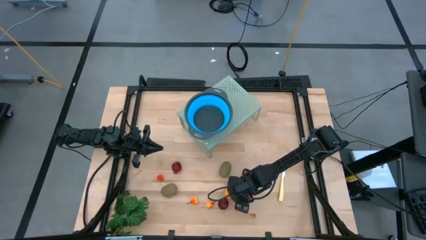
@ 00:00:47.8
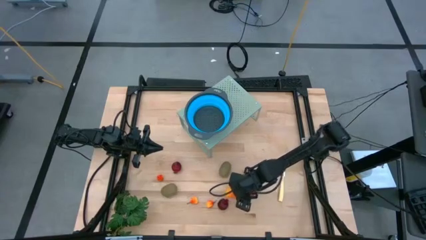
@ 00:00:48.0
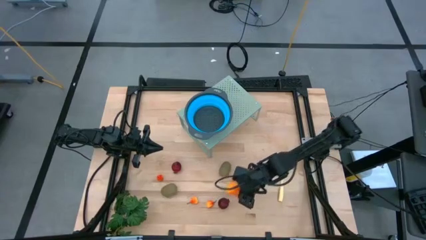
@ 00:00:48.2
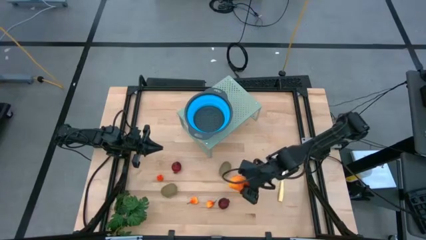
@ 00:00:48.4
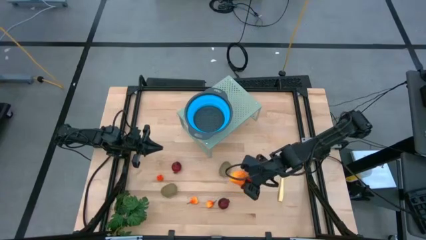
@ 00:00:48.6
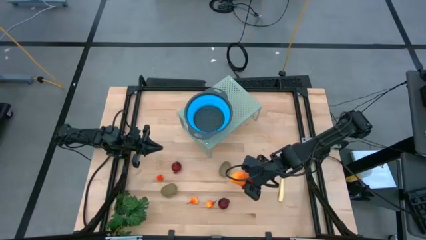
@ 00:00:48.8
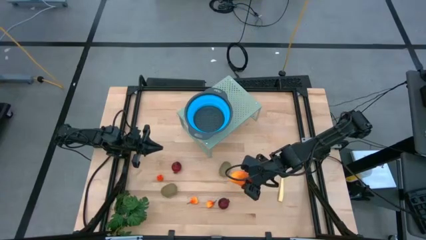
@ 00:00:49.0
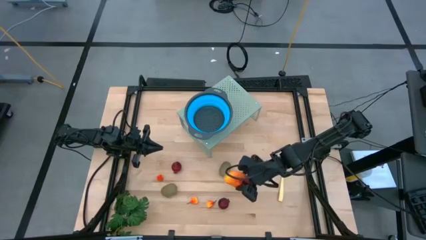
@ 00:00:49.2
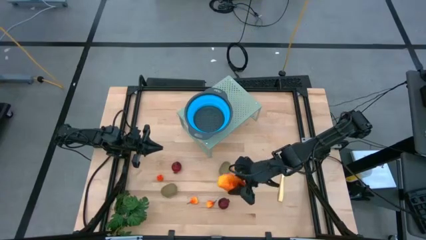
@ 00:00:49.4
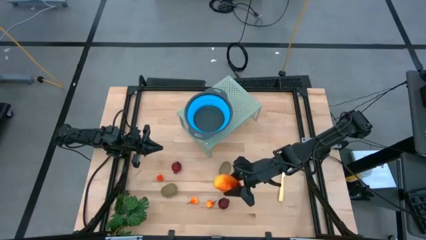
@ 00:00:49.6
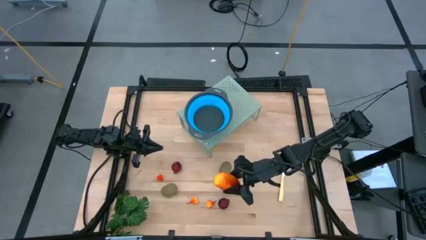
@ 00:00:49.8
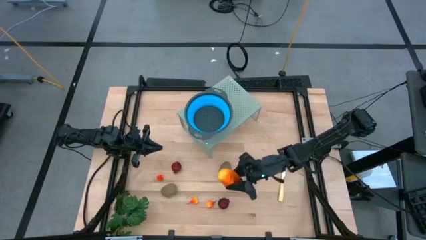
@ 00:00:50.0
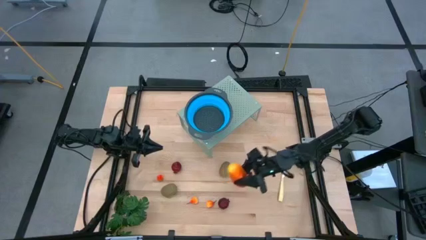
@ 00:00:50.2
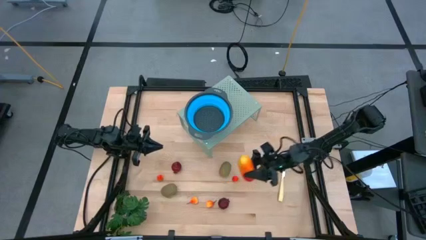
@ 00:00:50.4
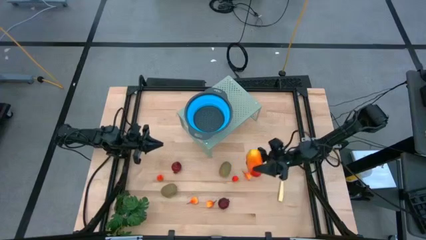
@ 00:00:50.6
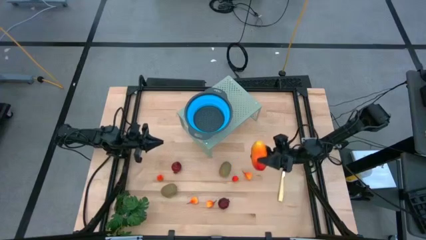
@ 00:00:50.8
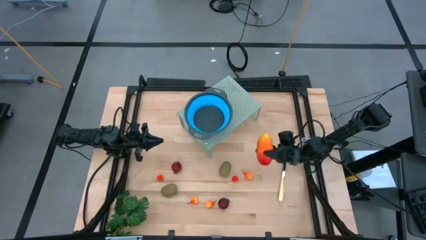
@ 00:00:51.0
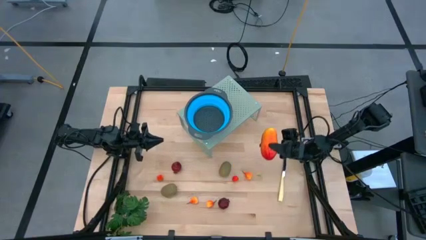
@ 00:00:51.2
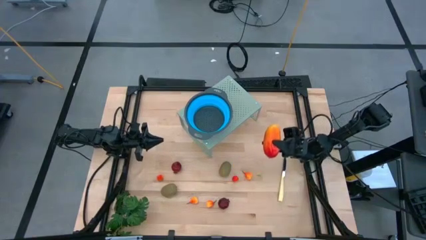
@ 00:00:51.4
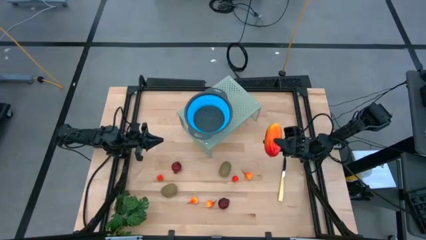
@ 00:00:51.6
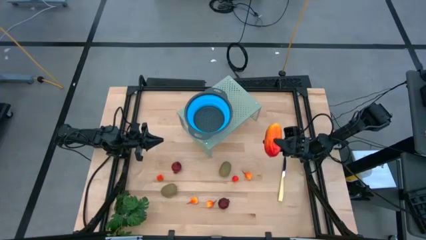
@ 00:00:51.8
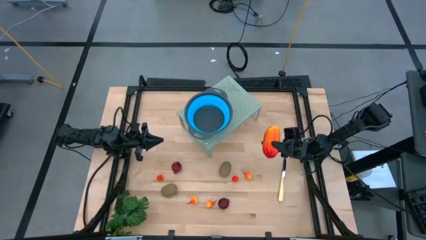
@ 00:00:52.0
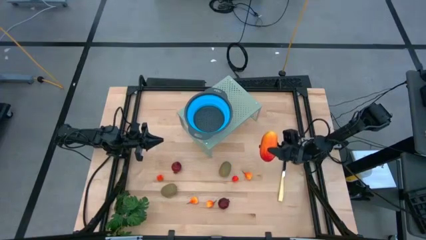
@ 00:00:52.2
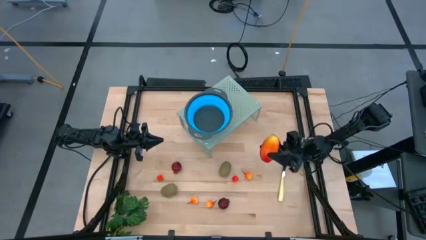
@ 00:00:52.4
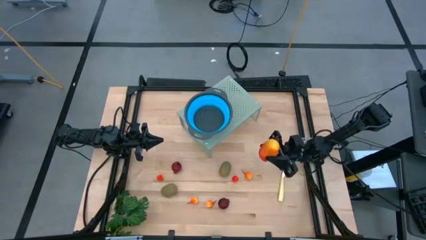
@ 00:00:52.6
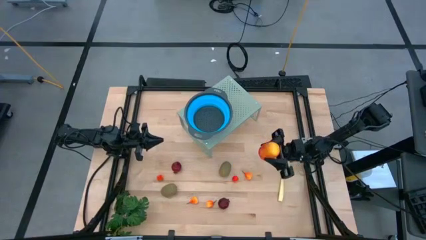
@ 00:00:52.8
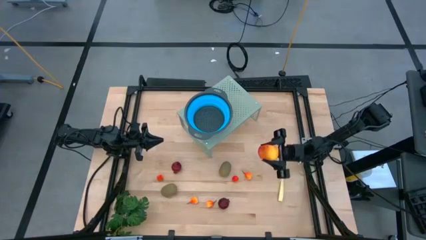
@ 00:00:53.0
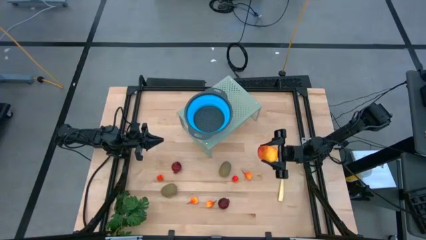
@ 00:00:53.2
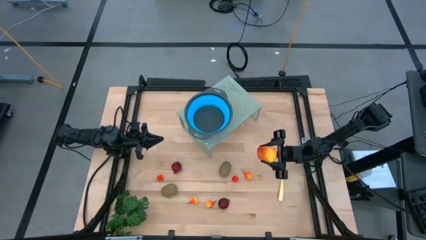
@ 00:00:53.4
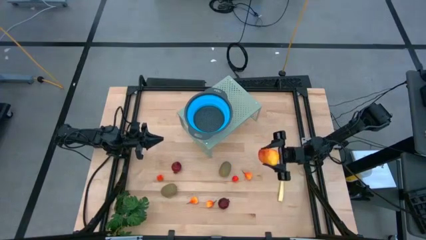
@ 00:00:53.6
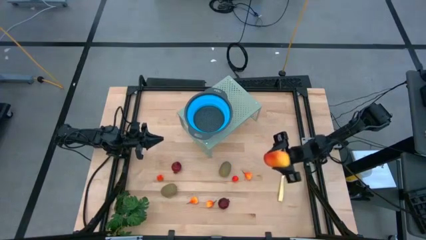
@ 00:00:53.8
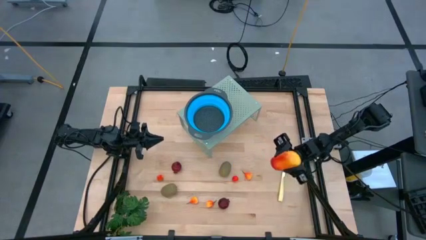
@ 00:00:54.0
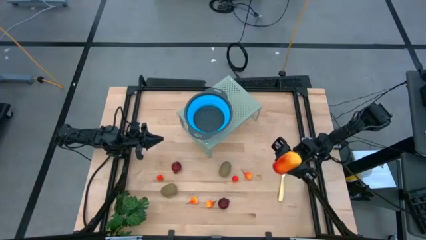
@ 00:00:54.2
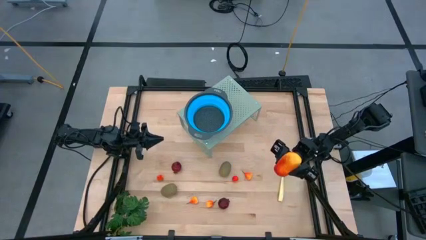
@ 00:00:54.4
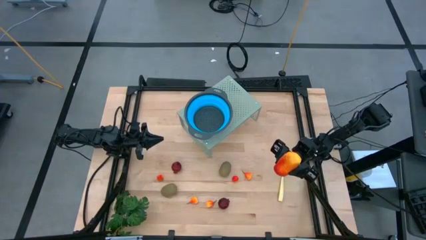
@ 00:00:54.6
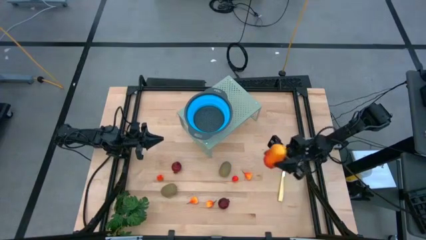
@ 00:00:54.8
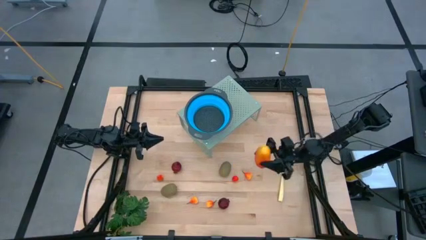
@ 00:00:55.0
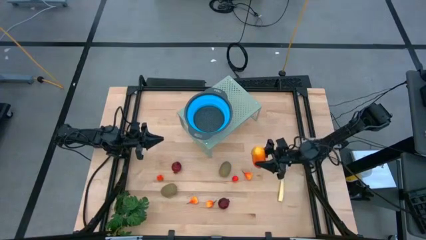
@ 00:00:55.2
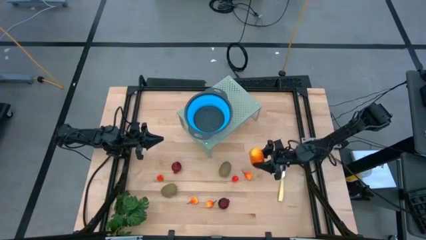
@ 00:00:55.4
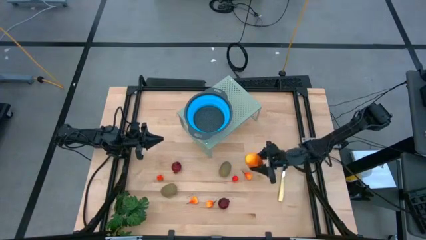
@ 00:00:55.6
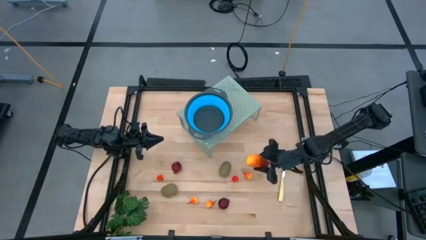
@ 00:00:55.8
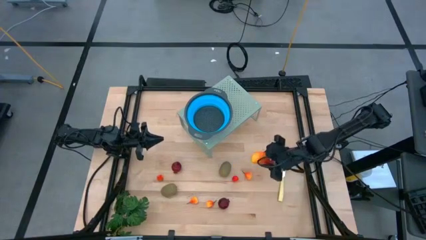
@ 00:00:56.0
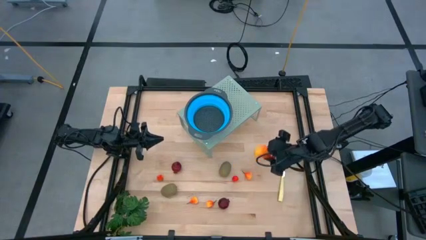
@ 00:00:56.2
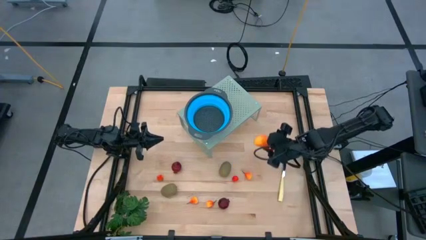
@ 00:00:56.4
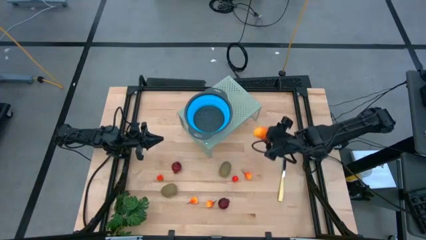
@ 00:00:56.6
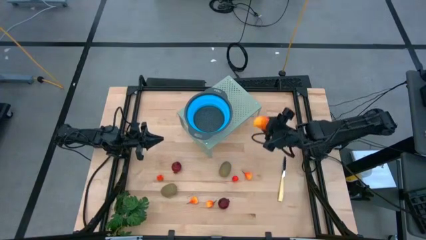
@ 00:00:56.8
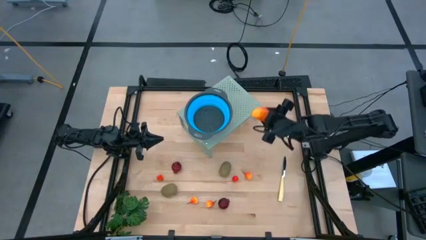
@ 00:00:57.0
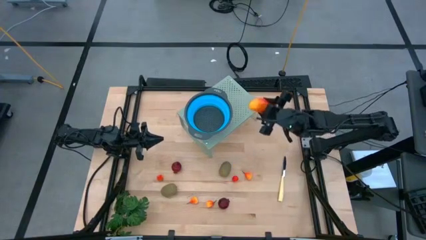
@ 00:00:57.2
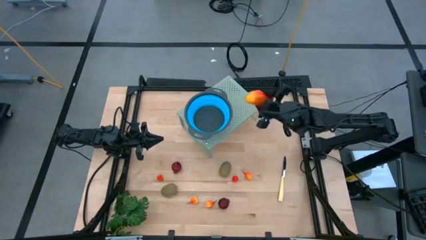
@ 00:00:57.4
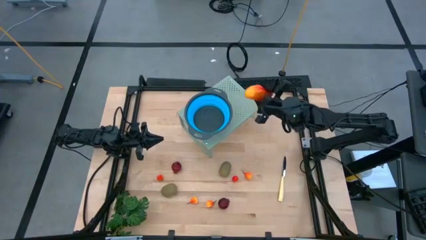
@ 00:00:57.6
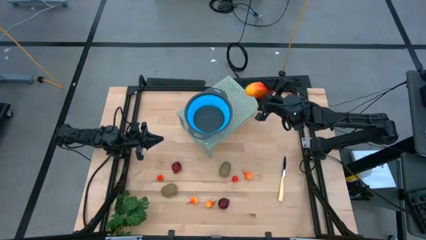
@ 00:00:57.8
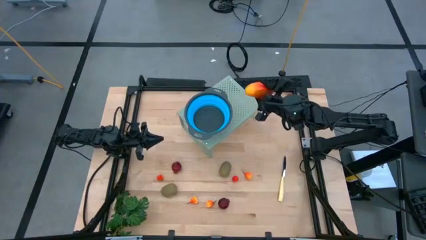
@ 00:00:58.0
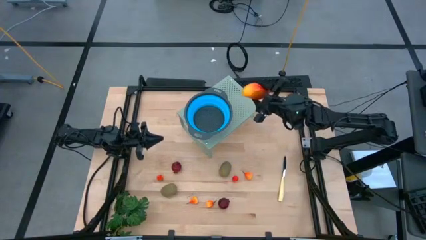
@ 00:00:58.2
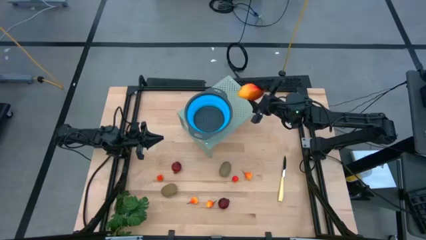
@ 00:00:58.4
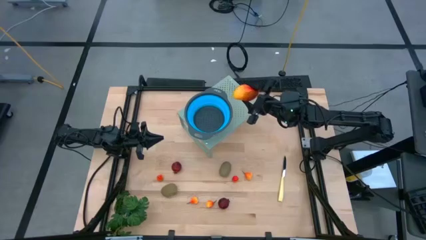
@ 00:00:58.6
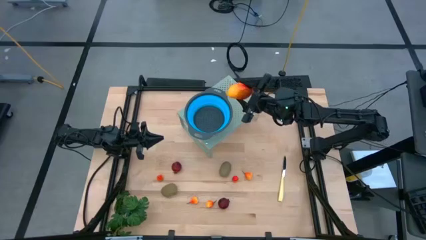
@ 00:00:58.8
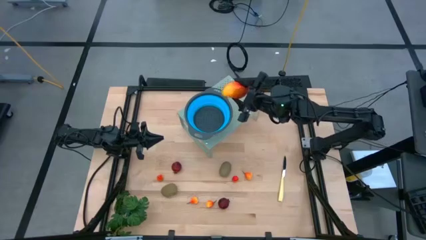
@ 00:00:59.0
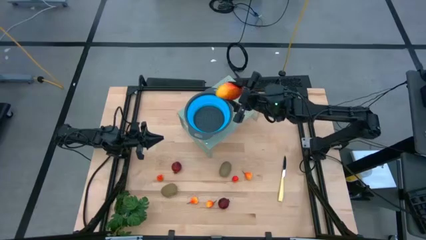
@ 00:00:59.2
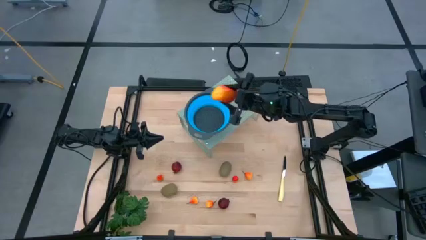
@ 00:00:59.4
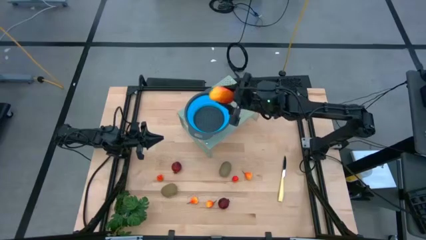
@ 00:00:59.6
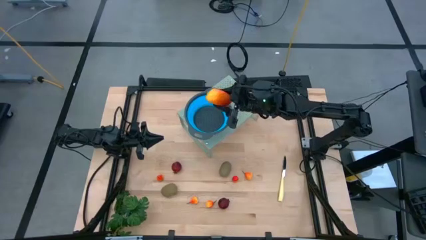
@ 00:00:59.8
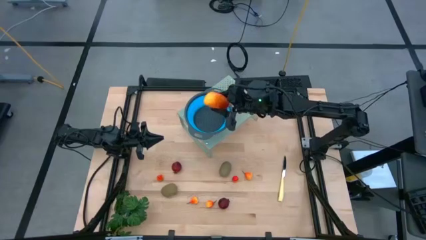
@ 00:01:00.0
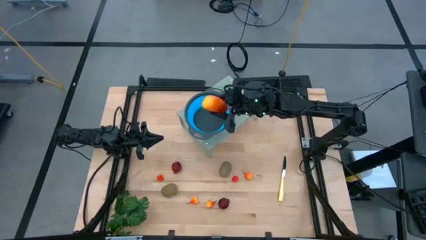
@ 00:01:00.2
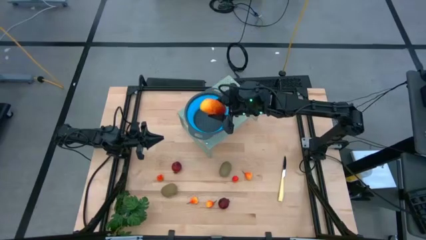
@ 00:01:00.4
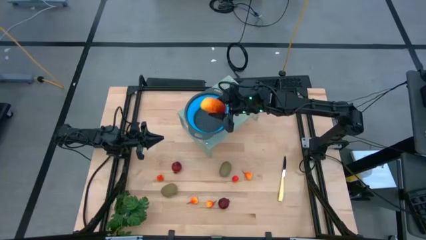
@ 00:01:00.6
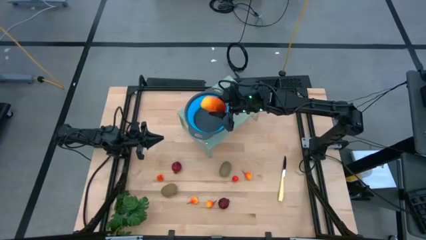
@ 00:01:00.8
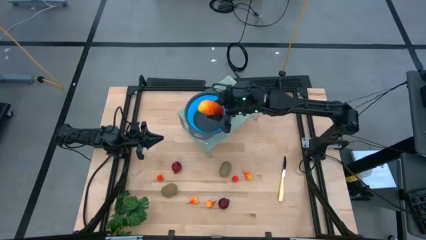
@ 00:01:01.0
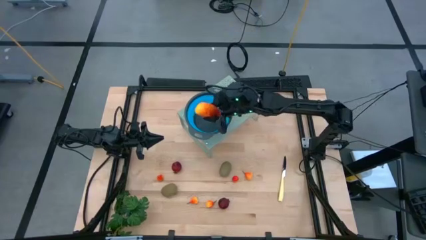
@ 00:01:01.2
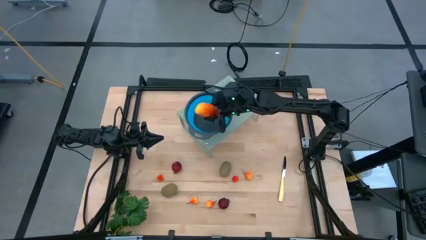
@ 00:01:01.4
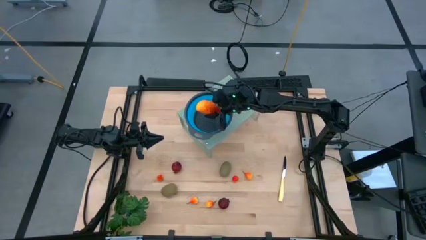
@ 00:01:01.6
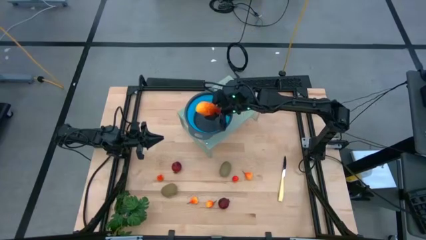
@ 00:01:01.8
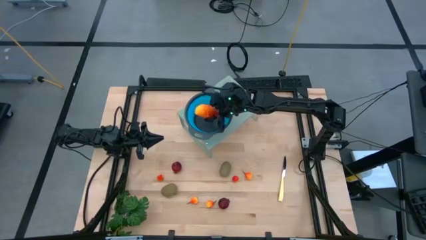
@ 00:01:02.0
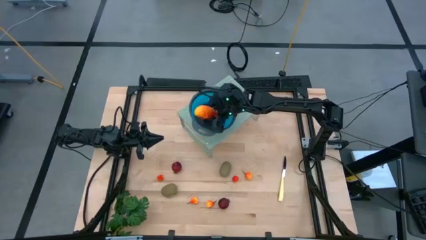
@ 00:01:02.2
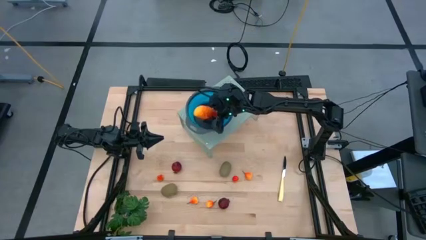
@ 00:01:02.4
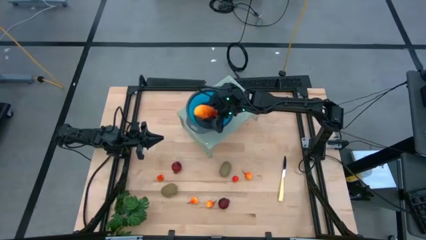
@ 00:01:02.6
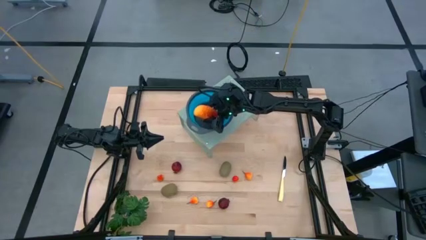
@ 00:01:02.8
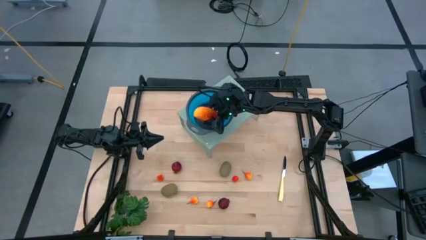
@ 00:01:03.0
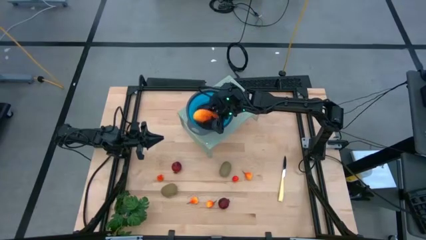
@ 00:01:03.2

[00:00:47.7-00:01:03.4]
Task: Pick & Place Fruit
Put the red yellow mango into the blue strainer bowl on the shelf
